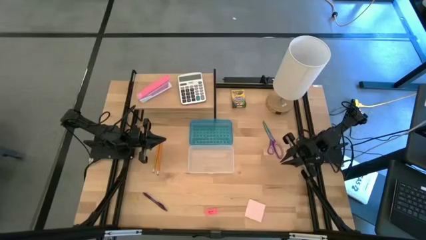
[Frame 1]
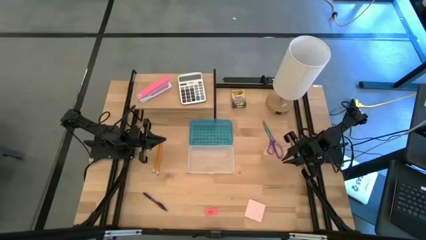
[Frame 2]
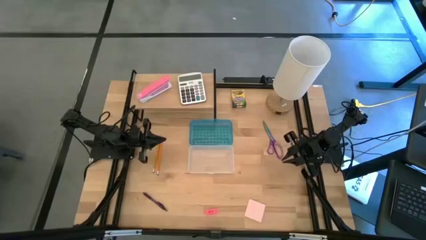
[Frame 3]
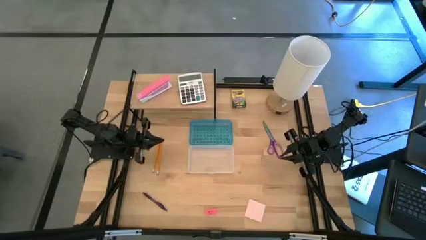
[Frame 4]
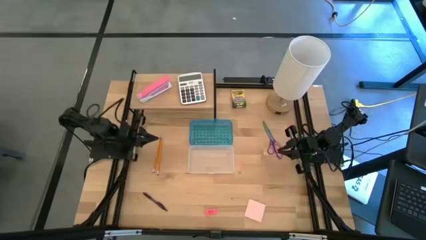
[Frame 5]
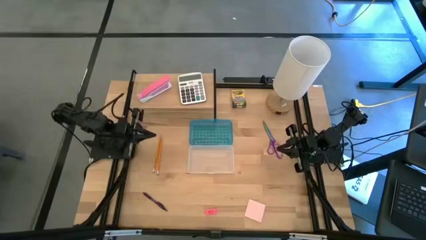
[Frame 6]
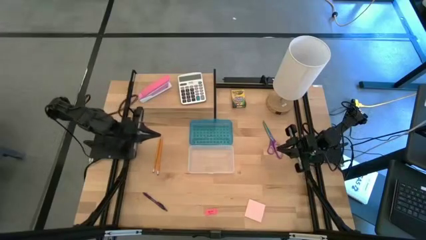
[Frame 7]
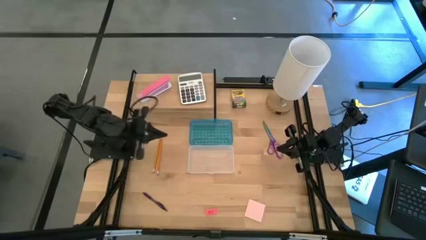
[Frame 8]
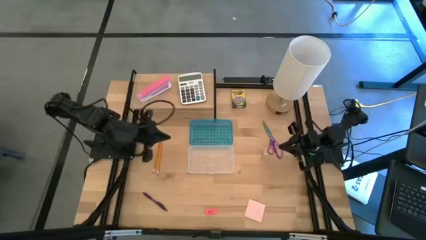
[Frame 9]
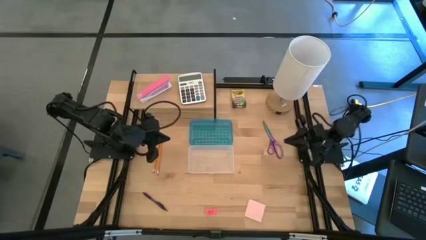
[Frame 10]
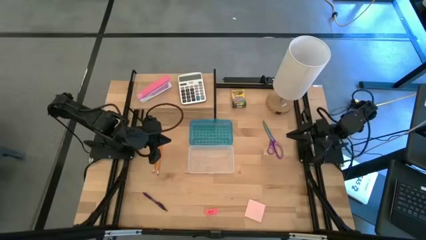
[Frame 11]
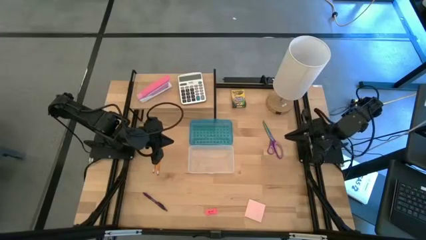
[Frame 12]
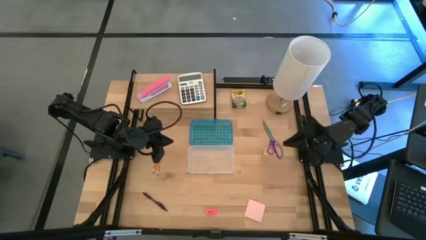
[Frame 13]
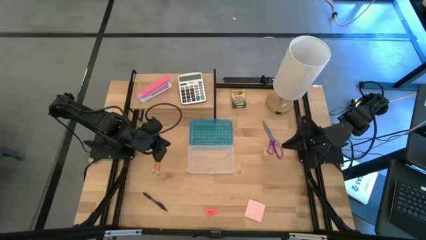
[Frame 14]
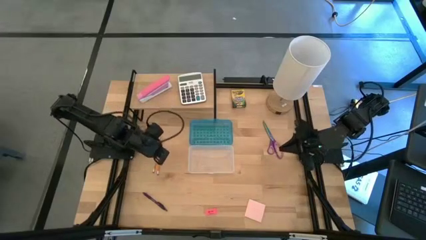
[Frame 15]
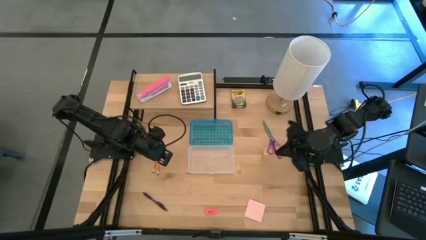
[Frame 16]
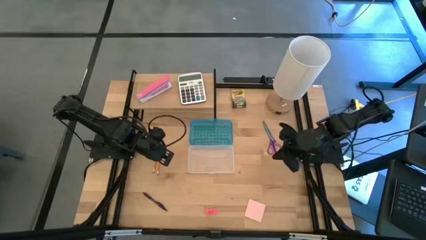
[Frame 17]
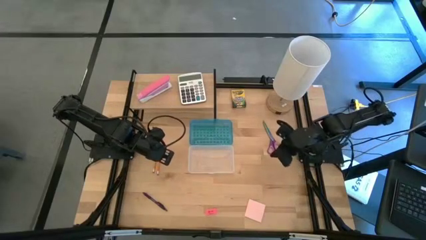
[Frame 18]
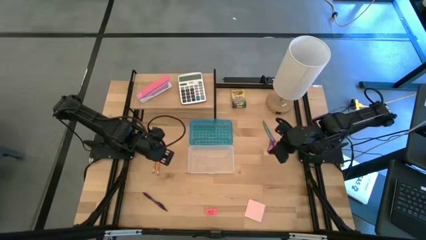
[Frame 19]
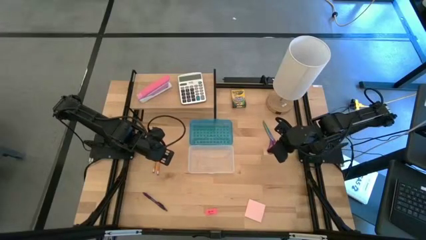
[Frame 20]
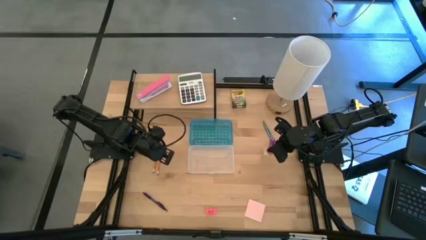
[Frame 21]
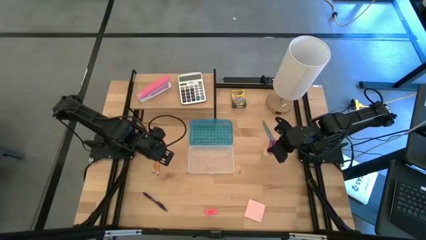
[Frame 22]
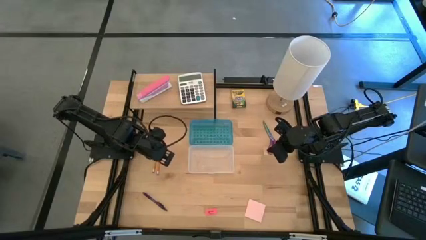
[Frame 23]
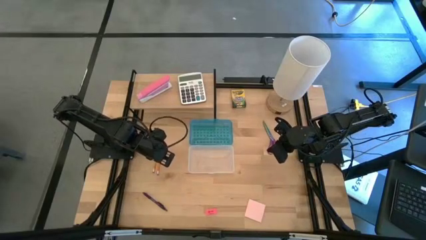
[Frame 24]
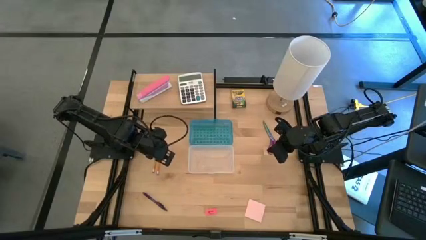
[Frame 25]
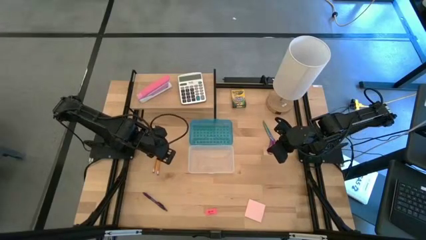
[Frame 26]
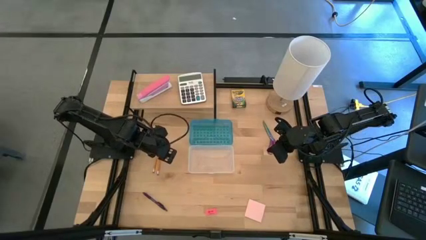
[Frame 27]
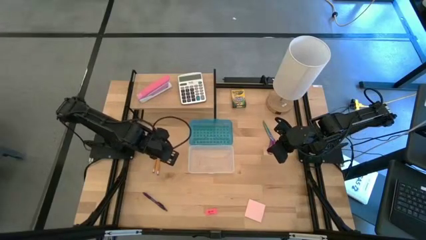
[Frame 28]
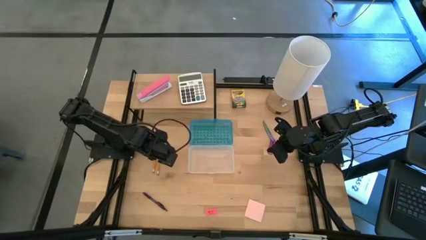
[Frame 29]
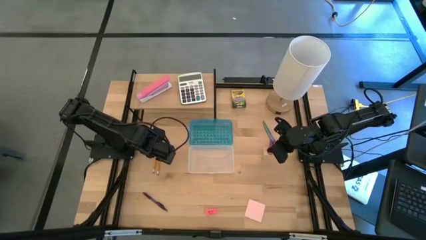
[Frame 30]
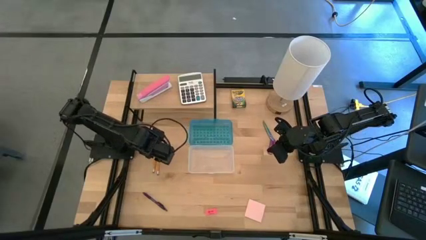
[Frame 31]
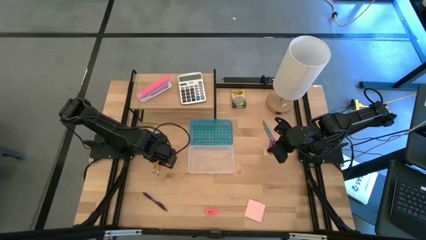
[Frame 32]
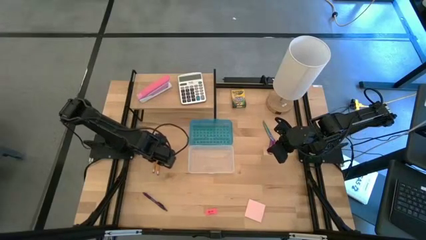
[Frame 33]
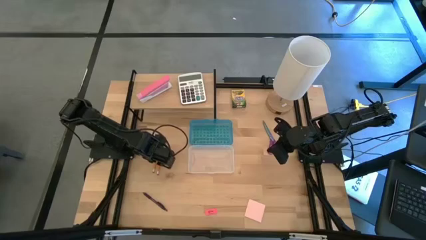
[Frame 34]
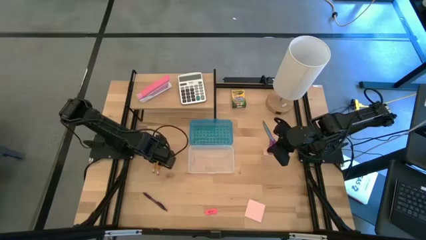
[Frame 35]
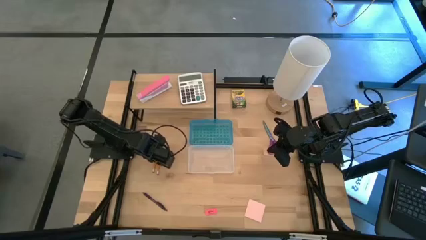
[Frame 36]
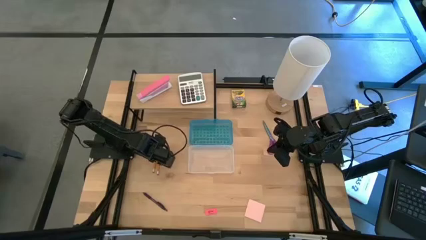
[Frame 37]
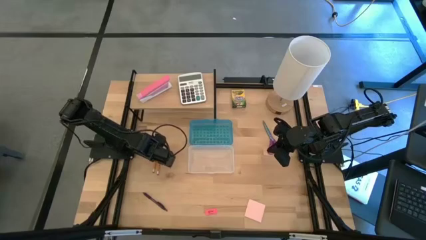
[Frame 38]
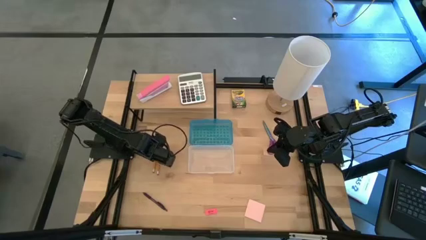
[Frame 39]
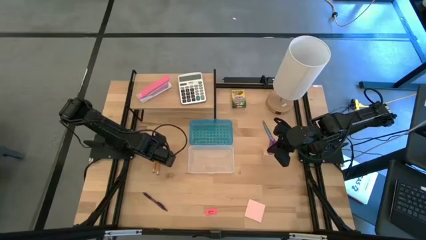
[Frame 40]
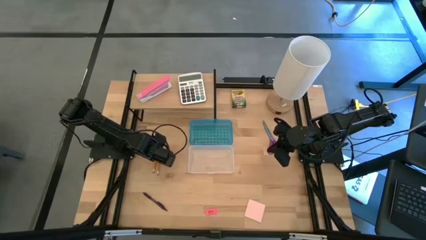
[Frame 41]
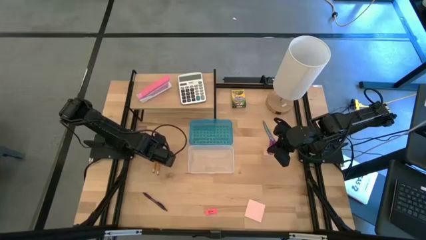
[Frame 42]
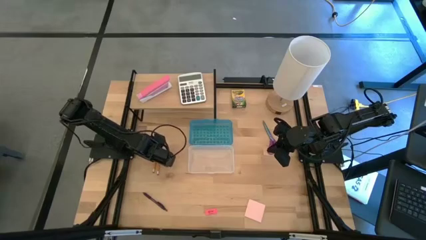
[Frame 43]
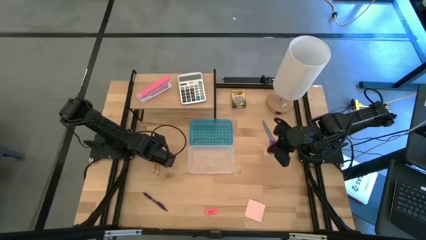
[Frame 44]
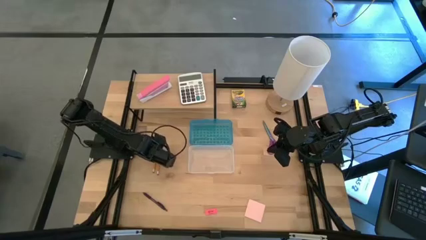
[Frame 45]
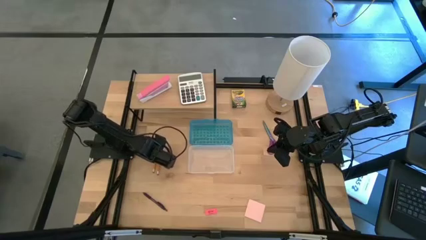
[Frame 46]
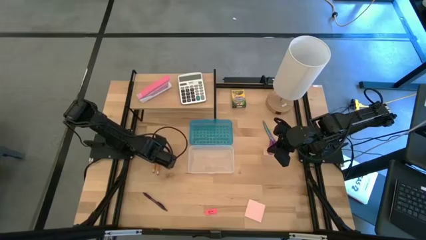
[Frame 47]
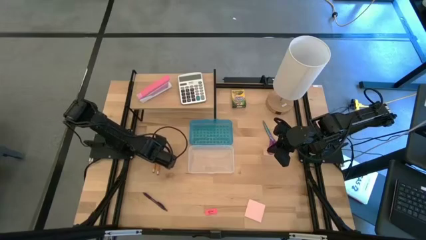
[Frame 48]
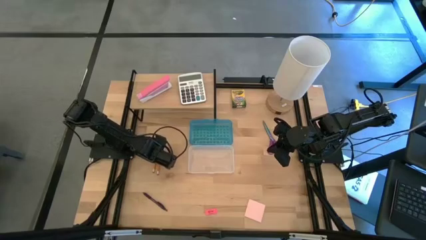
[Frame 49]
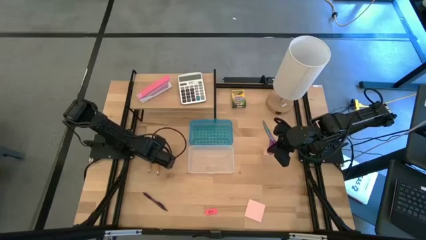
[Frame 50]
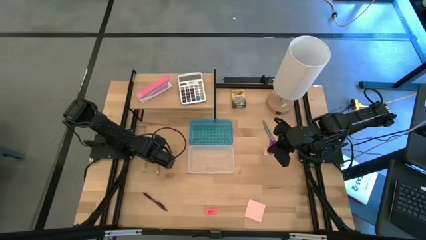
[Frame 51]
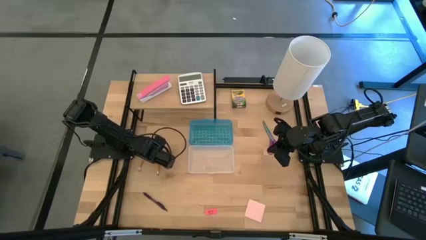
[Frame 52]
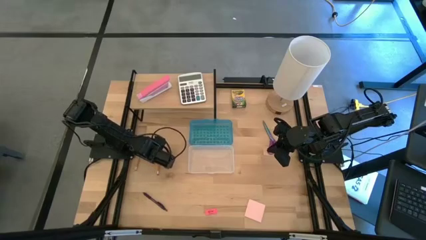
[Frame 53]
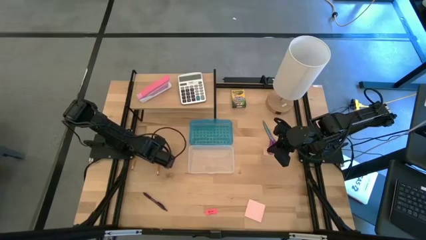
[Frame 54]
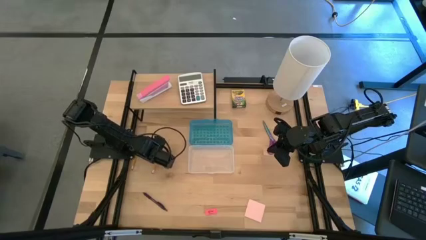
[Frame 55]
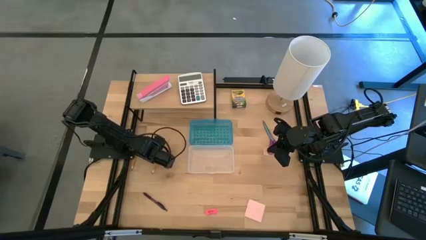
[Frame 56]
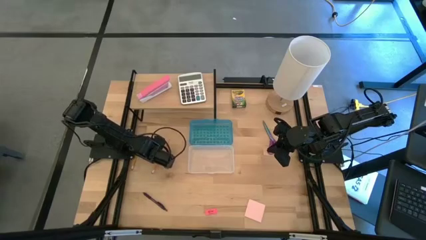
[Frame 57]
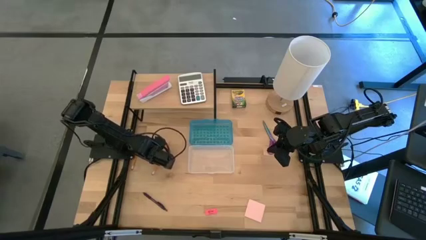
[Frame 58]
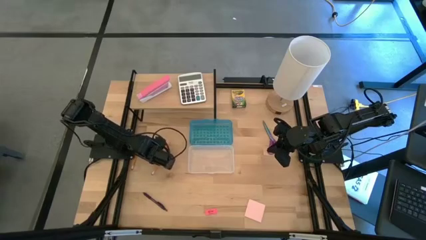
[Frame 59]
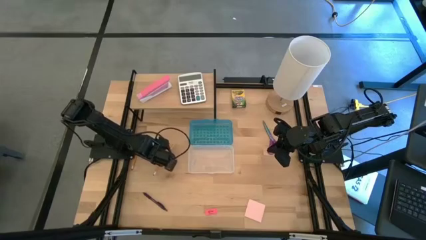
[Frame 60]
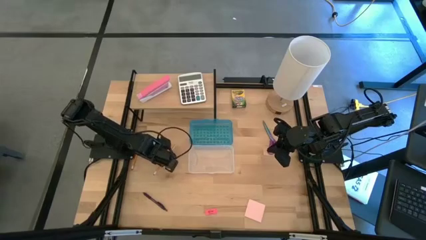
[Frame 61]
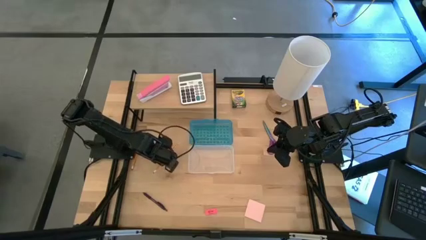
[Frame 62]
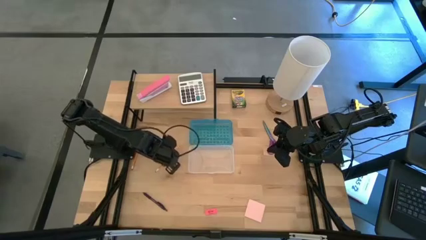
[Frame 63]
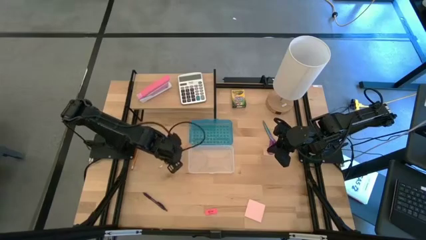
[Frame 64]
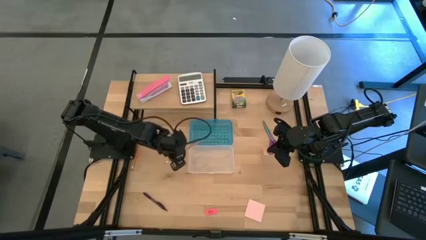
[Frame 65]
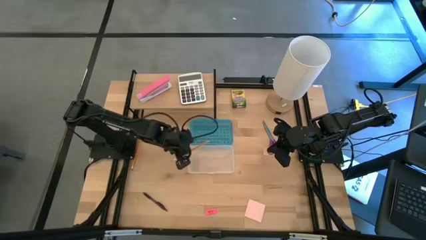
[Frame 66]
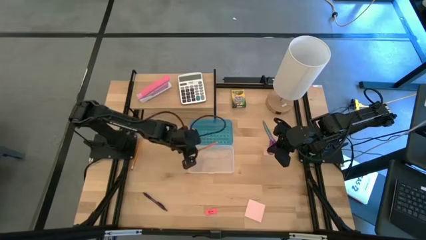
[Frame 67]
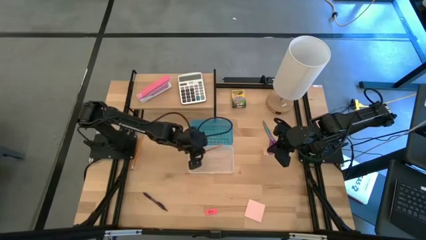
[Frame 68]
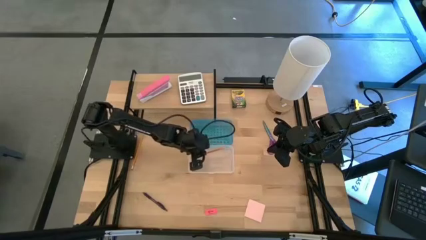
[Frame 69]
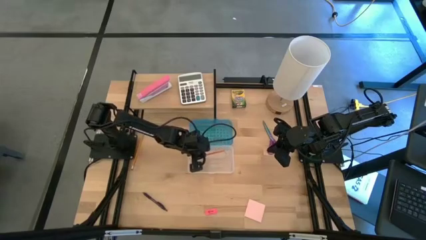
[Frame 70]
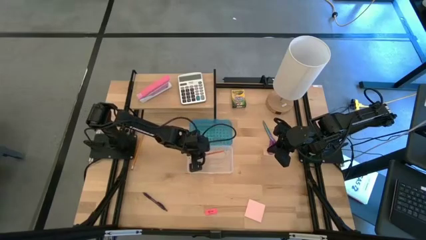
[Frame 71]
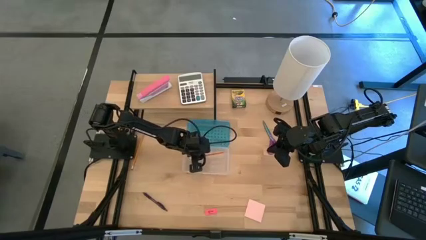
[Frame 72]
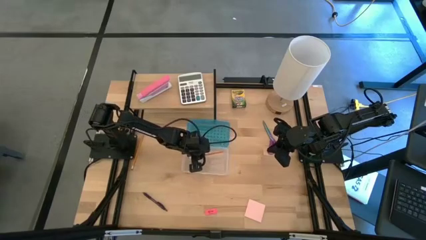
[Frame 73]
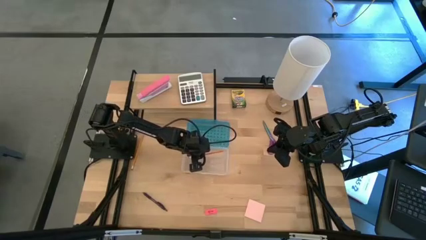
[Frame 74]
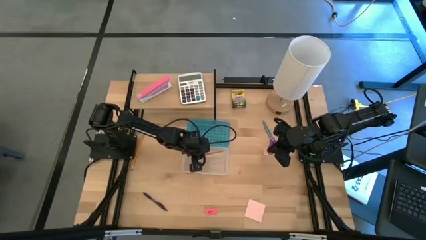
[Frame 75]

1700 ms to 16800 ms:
Task: Pack school essentials
Put the right orange pencil into the blue supply box
